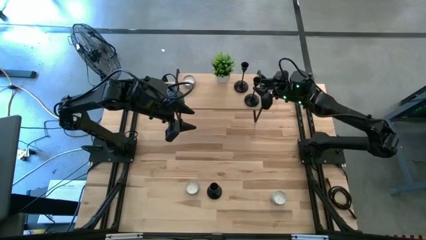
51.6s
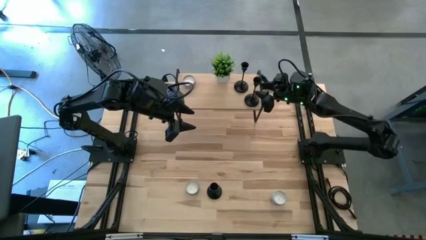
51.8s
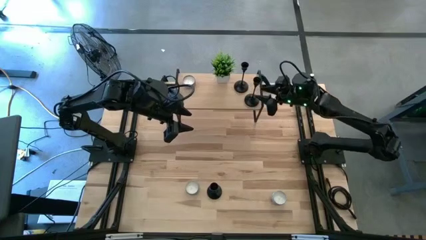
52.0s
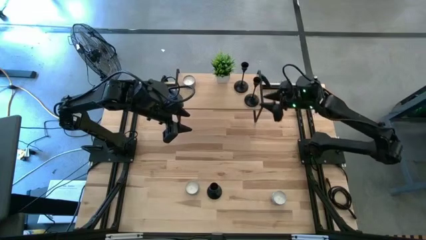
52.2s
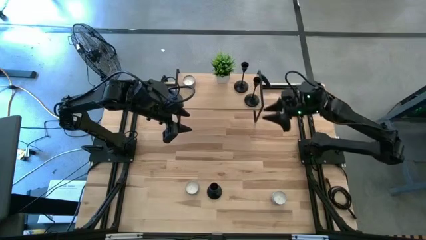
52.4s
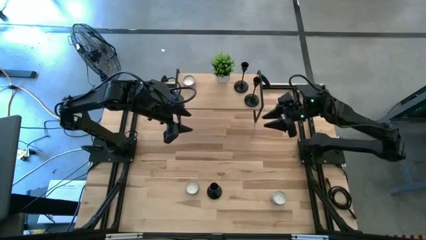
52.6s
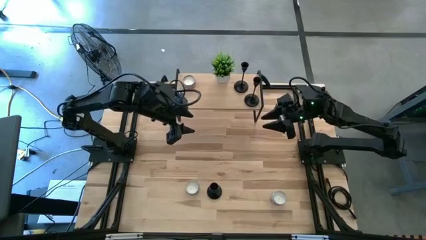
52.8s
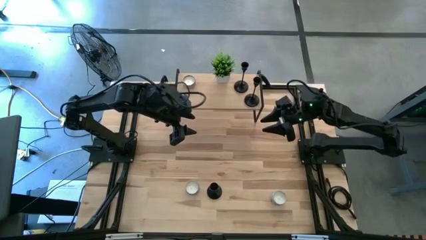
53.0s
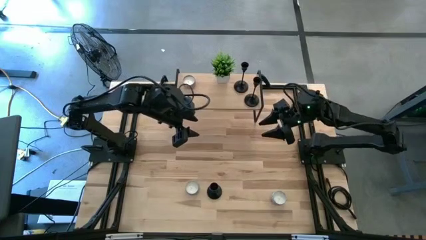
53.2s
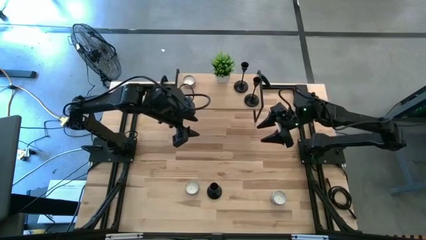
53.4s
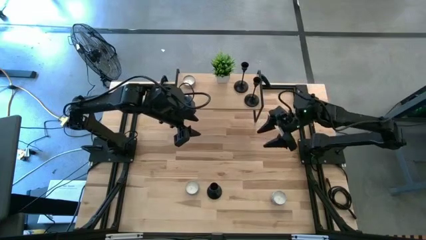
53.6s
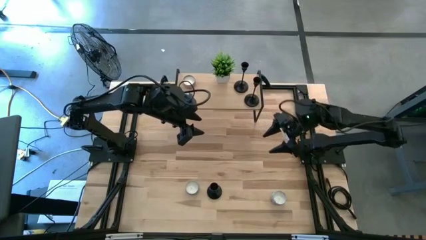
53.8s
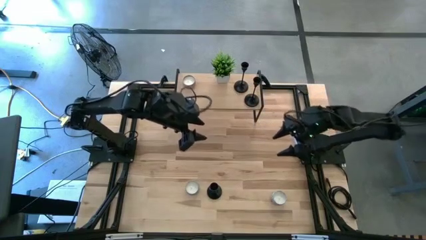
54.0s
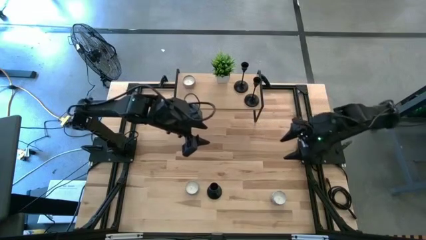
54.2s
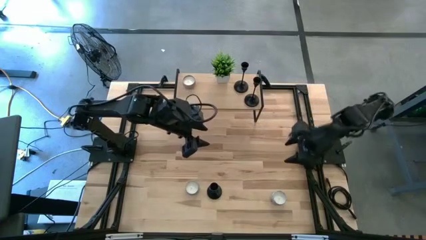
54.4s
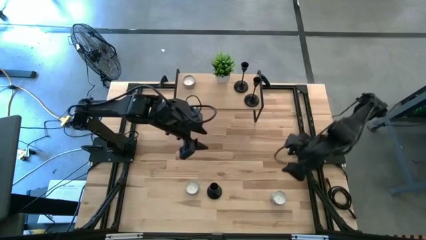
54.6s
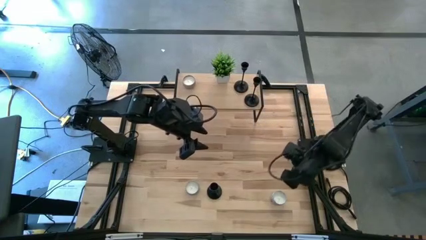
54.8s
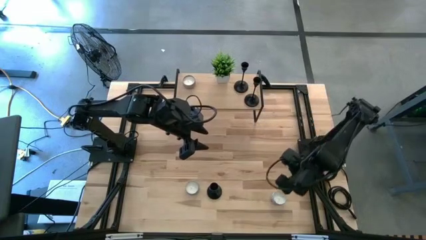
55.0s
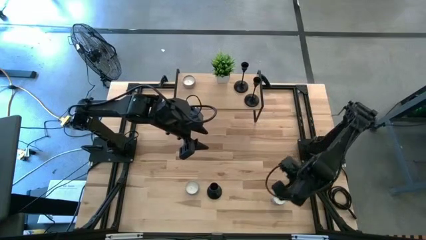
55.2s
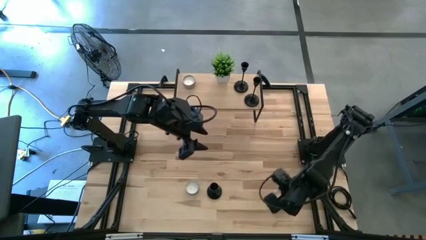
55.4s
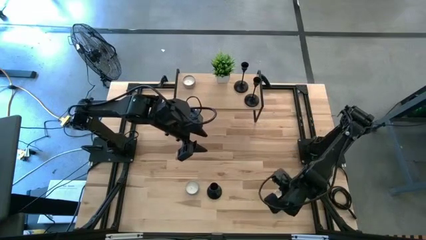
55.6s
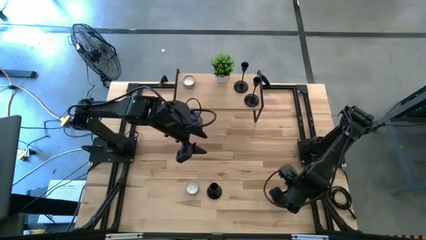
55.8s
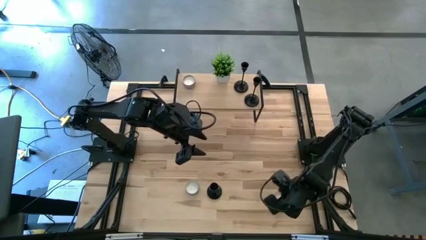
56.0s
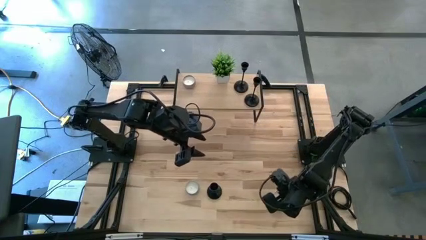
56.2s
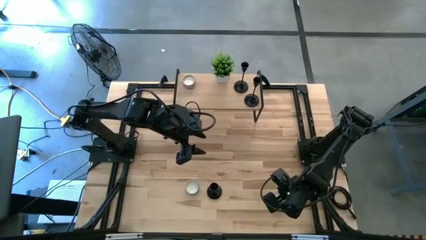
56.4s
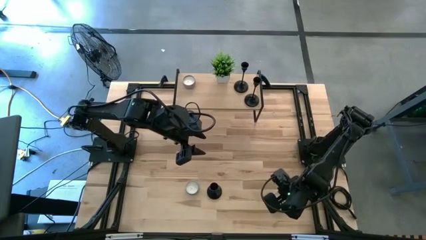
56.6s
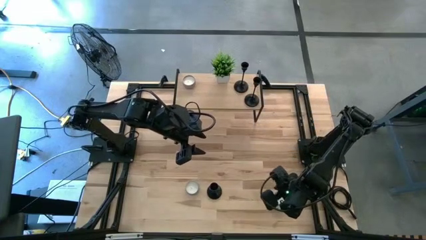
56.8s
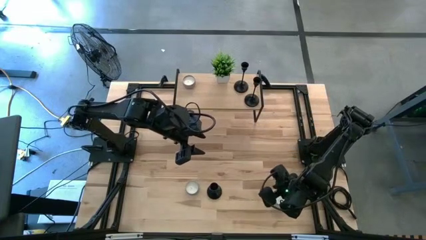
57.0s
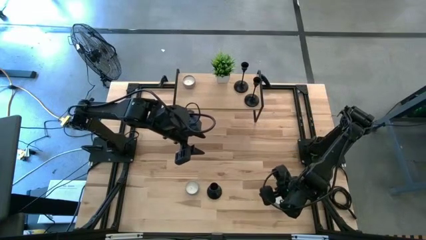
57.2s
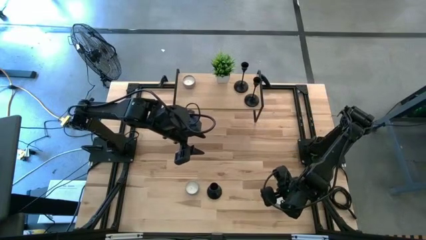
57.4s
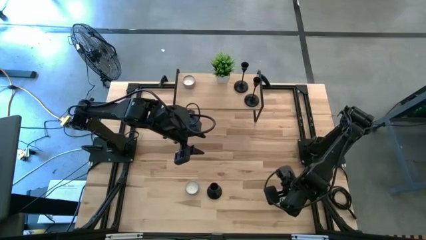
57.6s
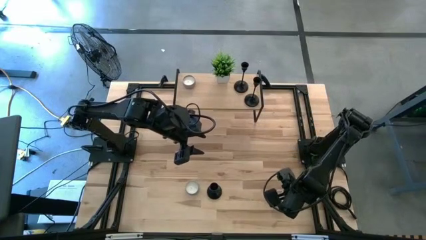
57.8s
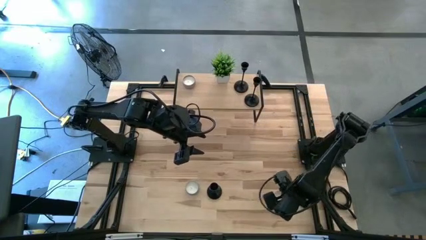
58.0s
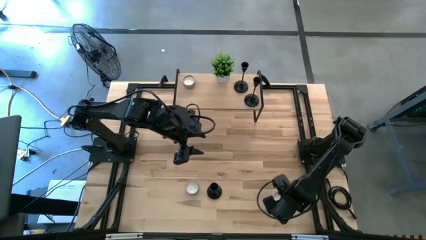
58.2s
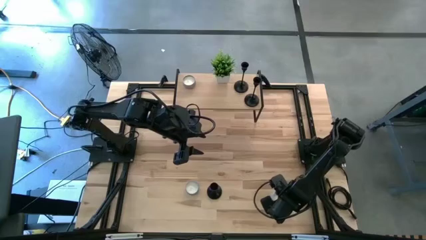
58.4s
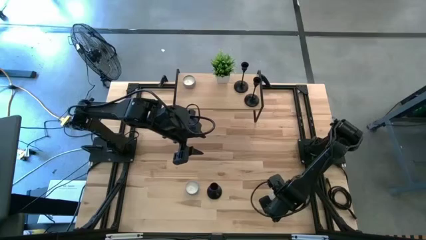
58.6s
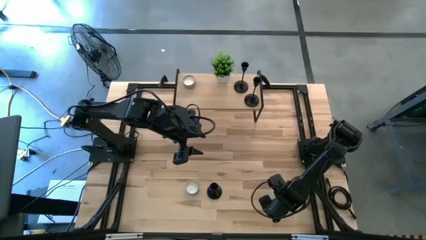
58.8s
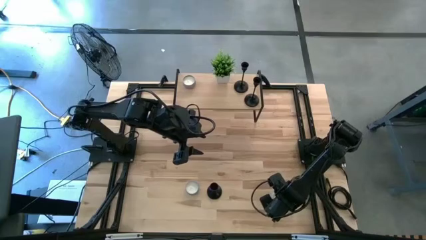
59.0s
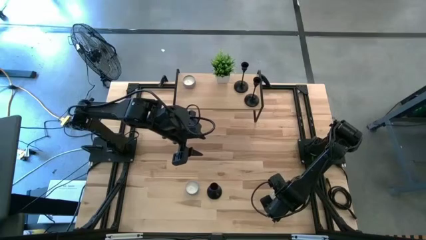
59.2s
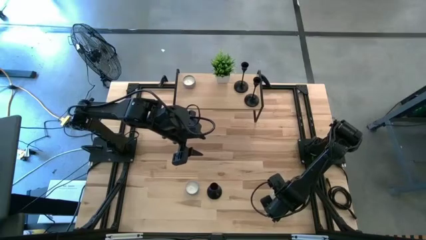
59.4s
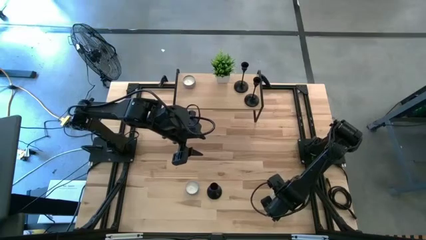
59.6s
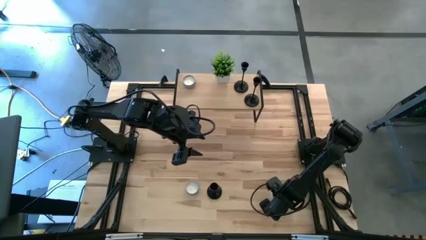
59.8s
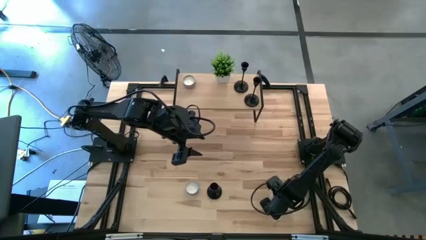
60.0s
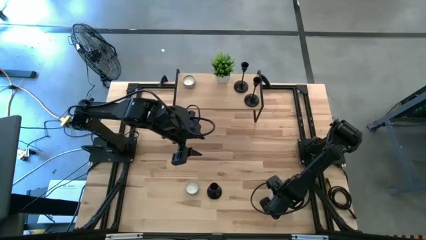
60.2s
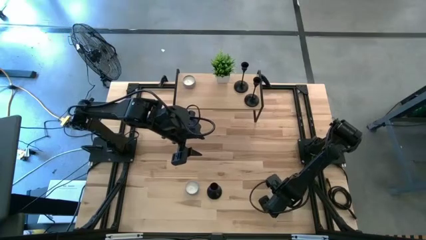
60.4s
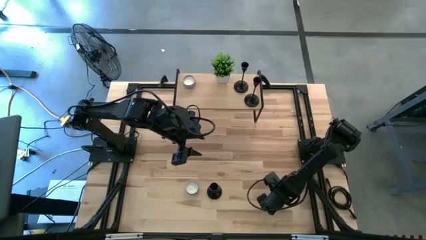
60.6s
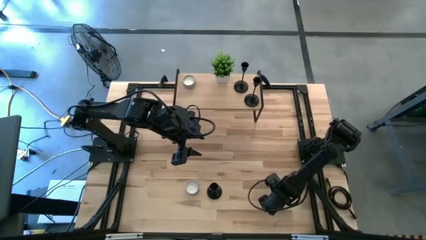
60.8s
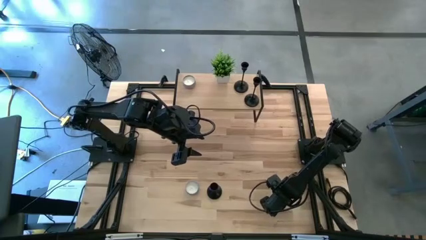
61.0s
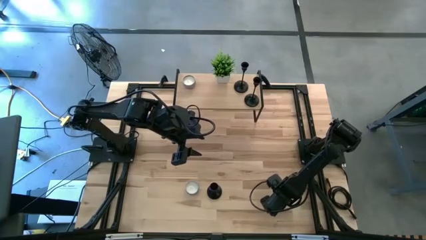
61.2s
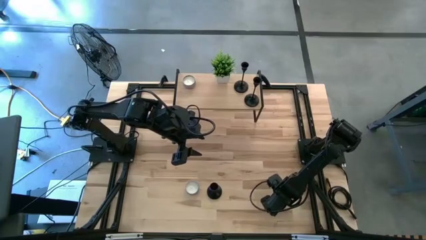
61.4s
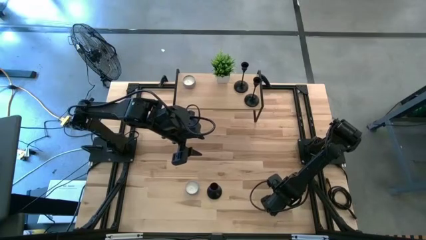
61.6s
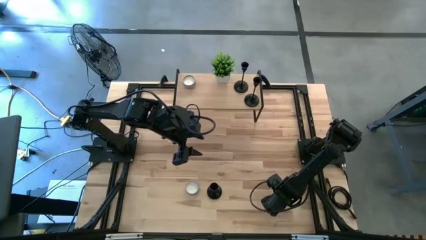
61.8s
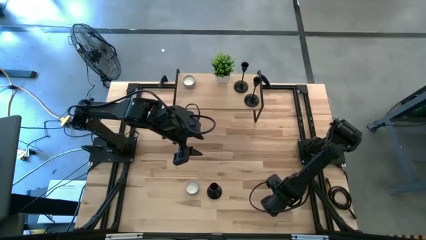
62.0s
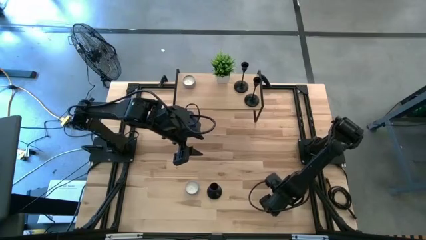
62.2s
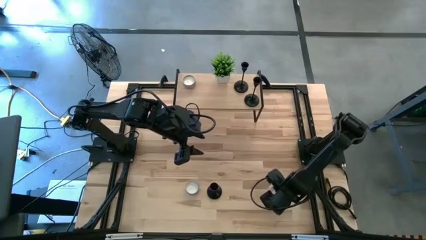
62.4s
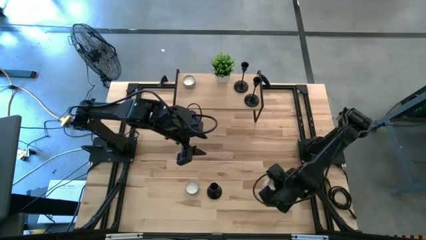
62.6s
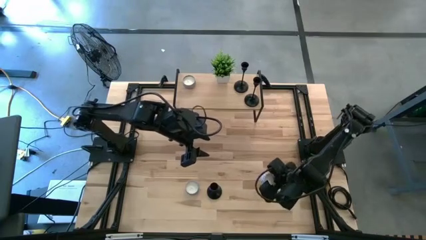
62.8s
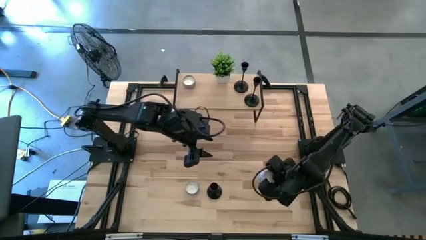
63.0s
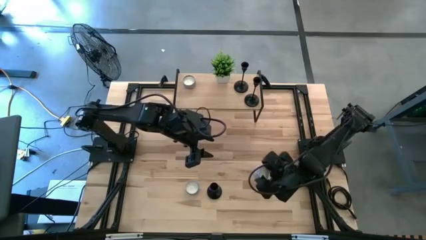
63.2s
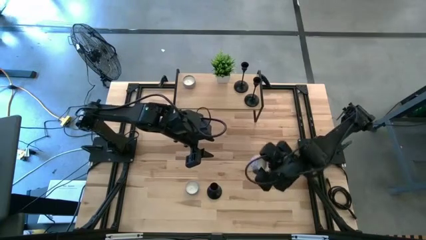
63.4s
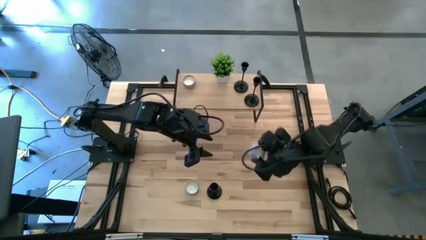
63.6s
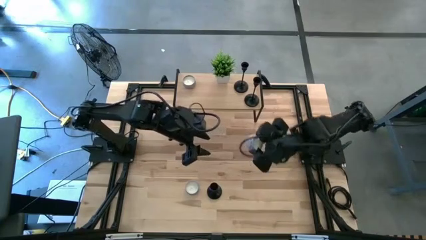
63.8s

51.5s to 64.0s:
Task: Pick & Place candle stick holders
Put the white candle on the shelf
